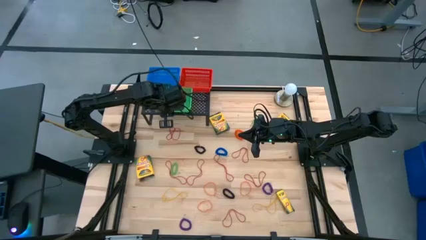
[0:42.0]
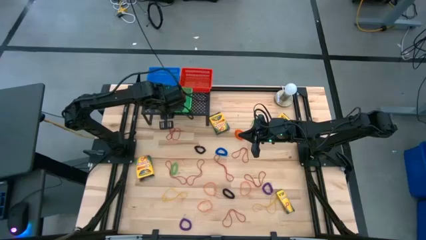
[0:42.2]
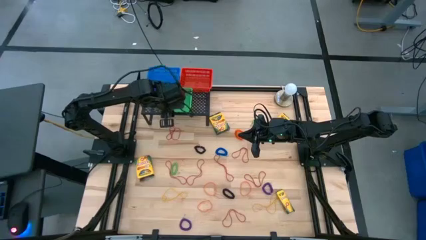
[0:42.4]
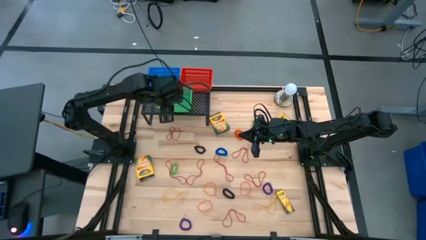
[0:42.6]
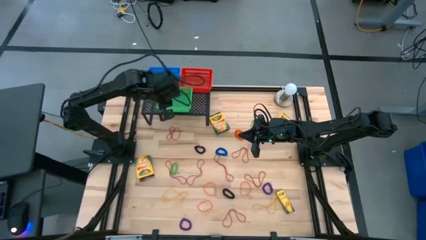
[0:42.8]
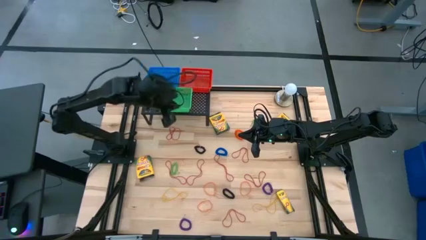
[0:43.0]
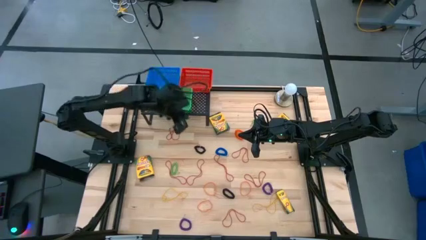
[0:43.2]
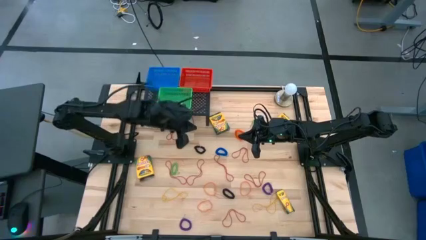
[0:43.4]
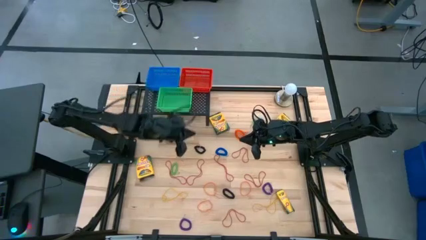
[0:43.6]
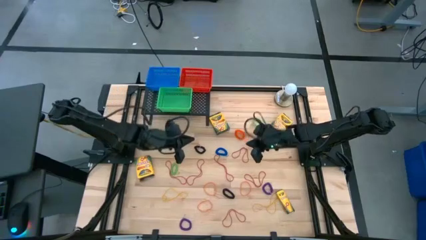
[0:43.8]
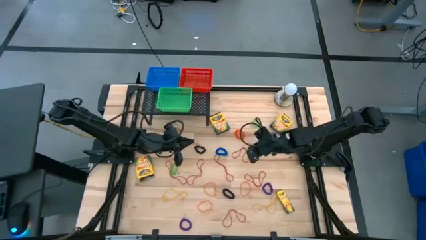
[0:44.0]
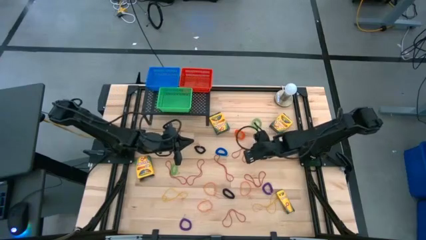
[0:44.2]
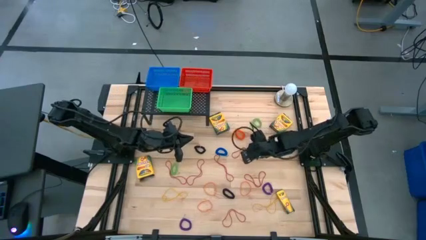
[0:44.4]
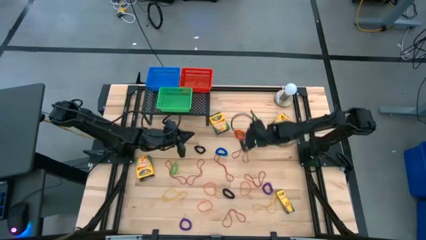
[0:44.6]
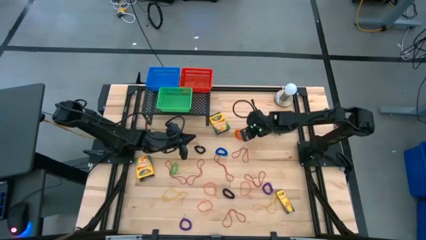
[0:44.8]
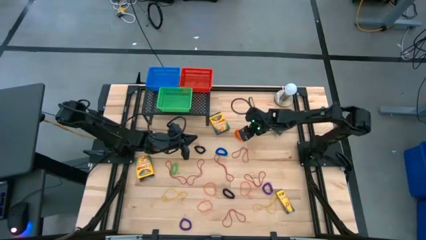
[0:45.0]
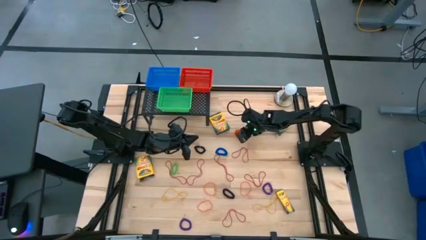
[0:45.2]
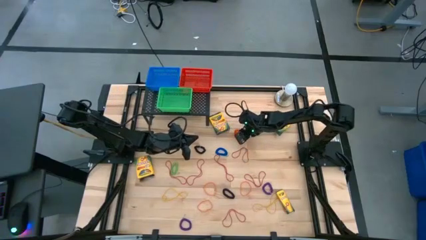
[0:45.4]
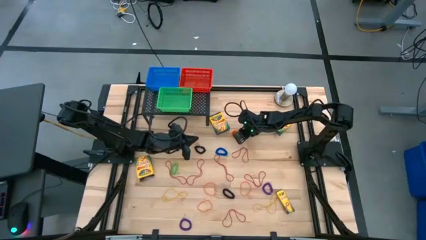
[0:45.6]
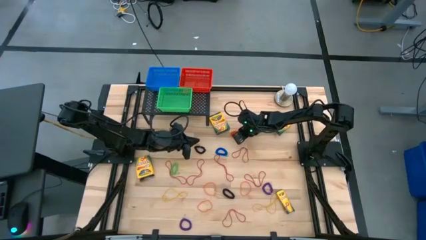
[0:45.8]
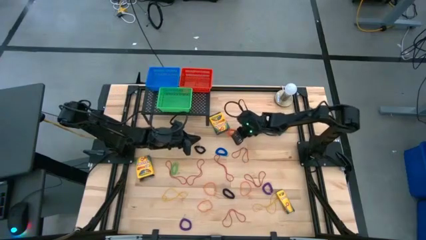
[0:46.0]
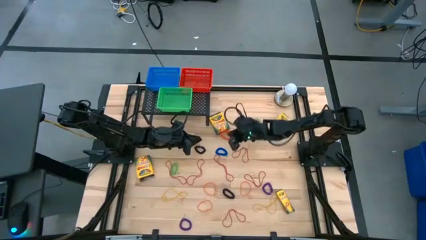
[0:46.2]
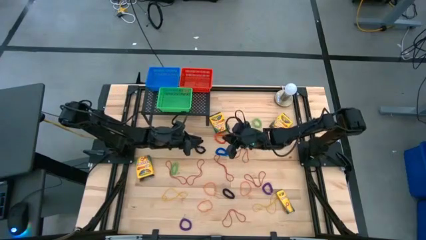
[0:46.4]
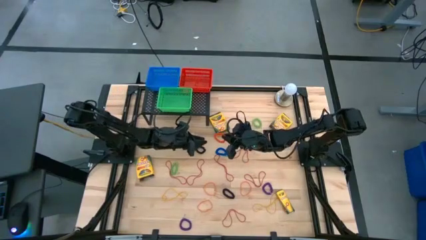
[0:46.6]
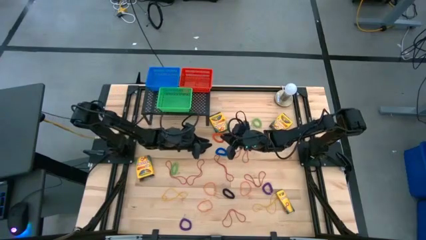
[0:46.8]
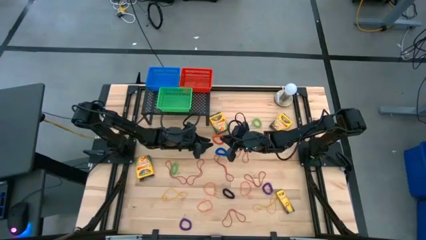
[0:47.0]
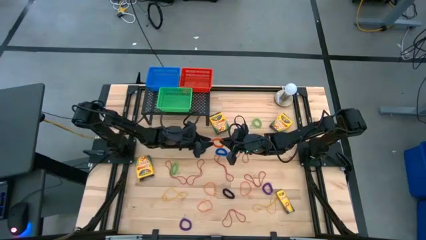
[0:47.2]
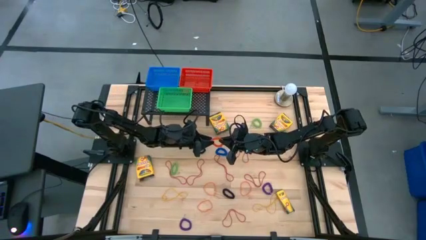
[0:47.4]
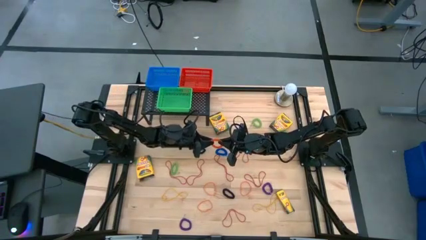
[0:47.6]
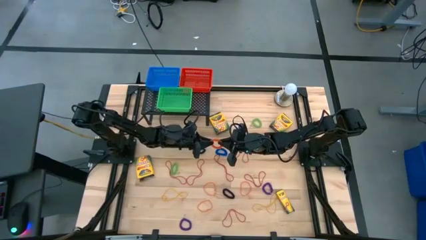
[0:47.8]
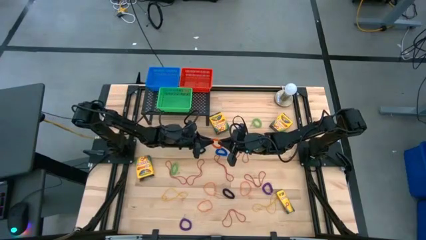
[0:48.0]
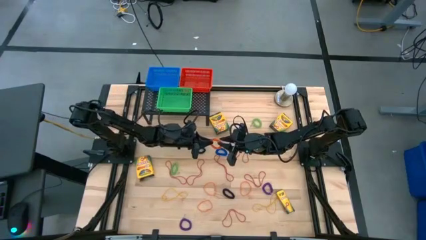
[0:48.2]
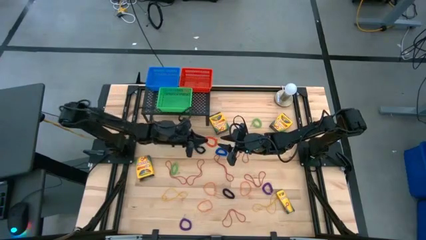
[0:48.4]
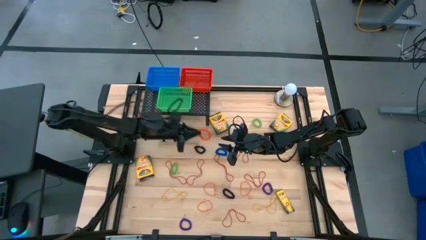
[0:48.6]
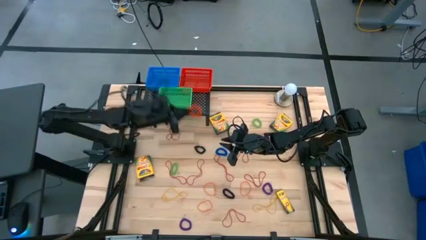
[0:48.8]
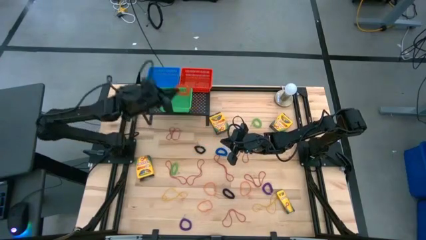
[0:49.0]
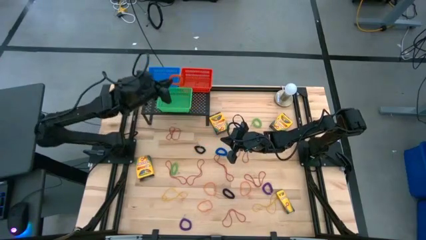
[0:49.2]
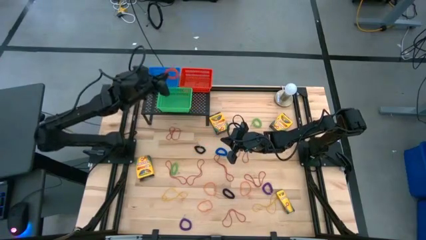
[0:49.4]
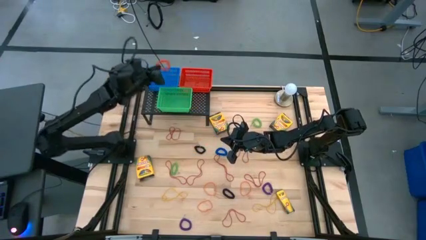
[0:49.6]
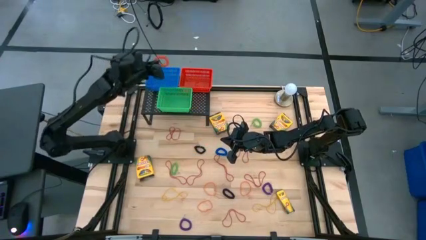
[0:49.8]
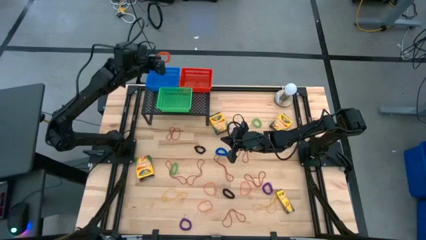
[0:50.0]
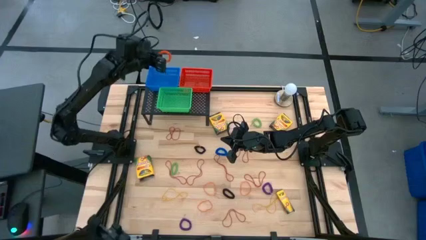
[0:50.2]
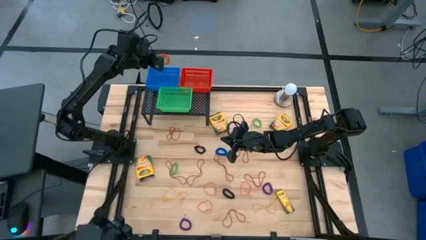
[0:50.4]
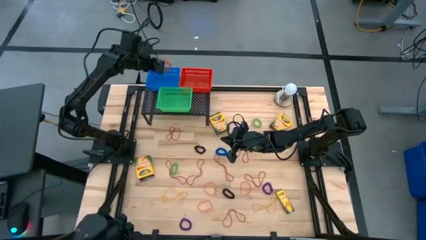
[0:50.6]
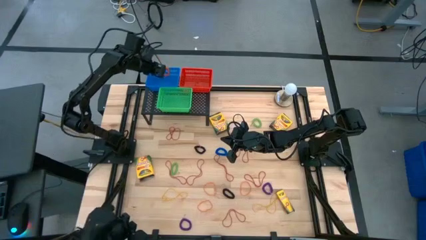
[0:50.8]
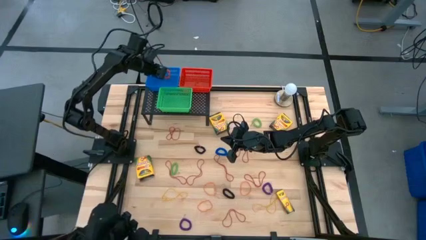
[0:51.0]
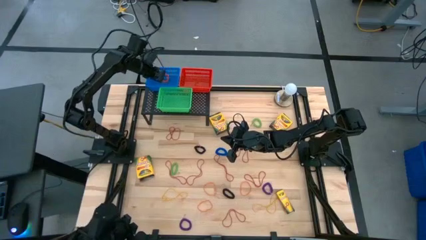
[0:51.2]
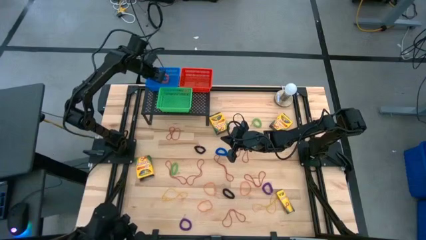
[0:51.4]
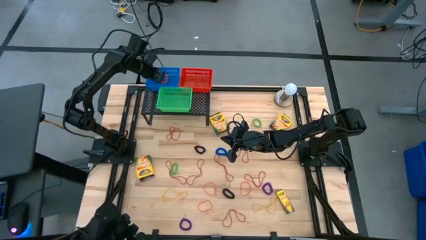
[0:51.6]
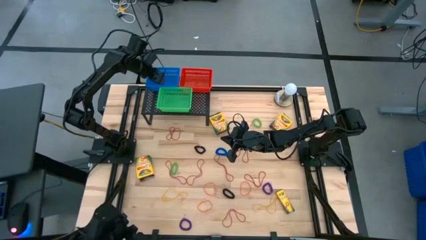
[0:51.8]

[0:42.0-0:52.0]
Task: Pick & Place Office Desk Supplies
Put the orange spring keychain into the blue bin

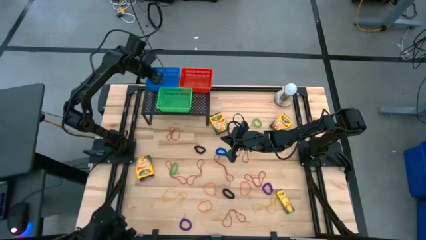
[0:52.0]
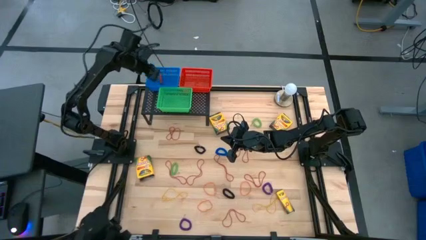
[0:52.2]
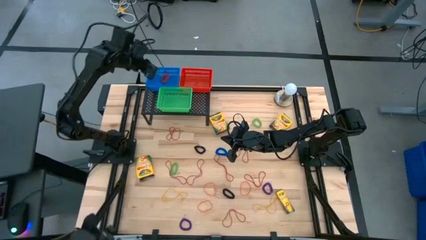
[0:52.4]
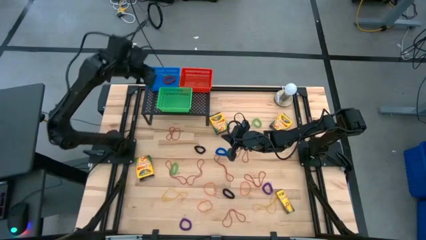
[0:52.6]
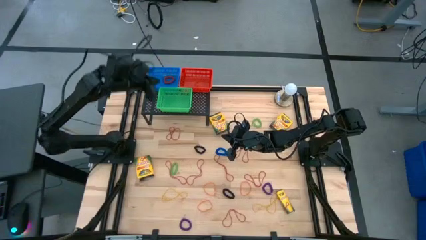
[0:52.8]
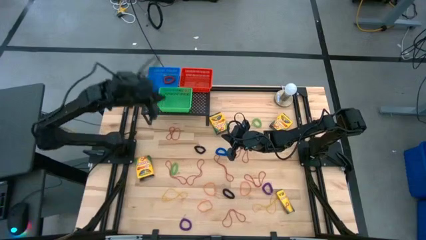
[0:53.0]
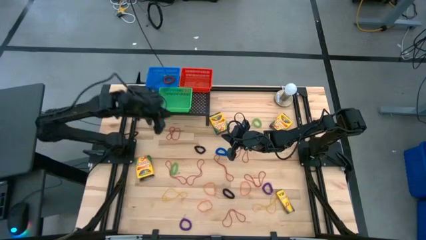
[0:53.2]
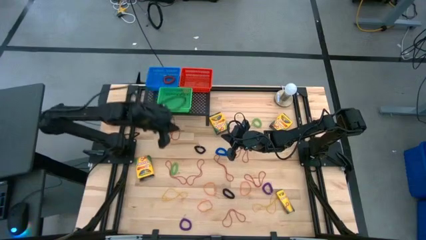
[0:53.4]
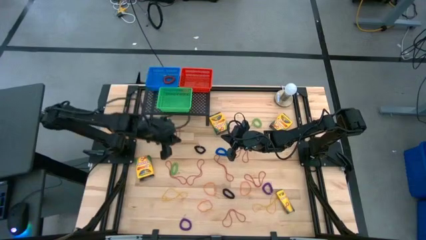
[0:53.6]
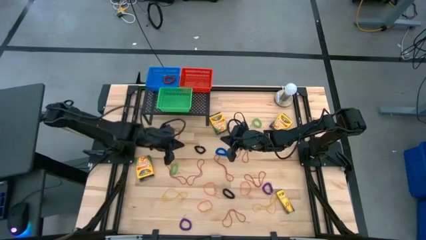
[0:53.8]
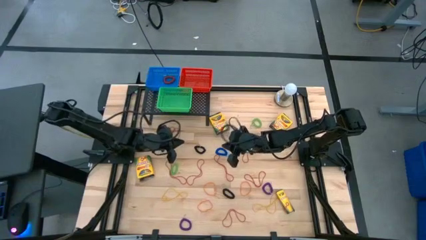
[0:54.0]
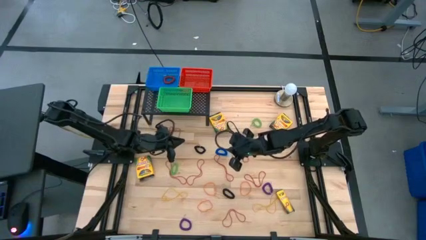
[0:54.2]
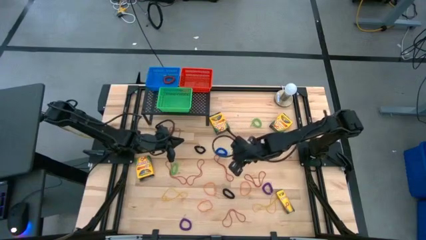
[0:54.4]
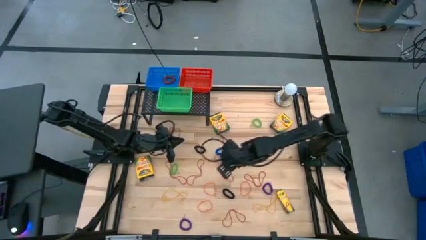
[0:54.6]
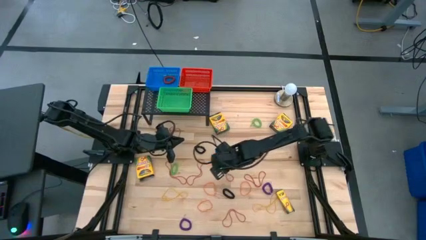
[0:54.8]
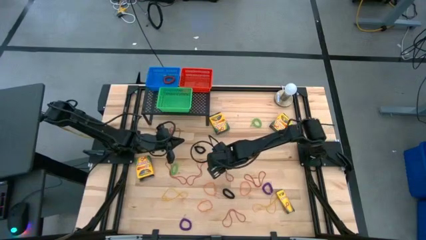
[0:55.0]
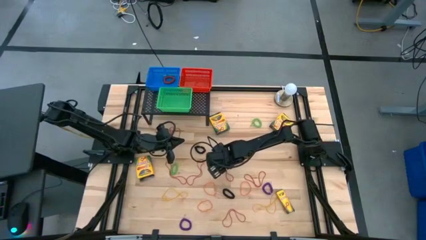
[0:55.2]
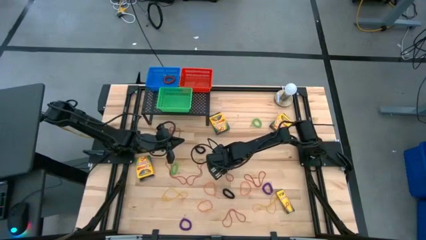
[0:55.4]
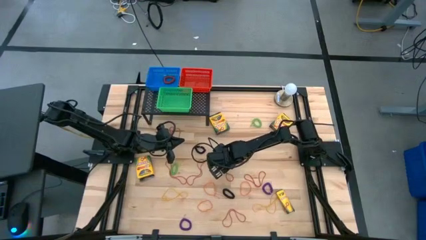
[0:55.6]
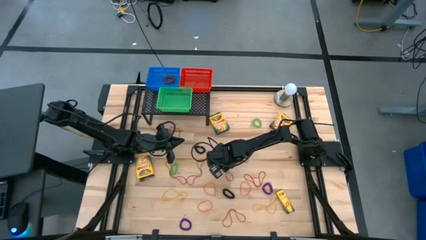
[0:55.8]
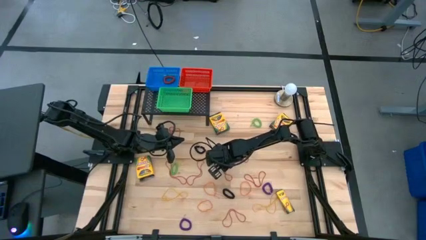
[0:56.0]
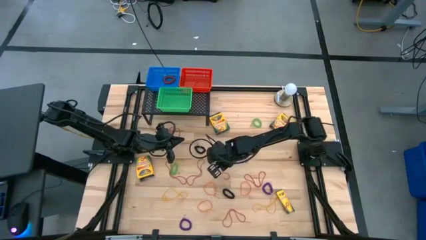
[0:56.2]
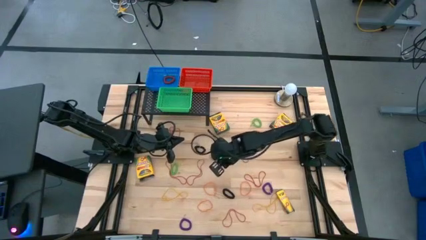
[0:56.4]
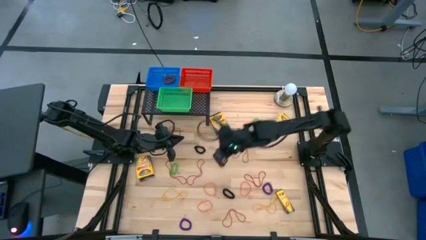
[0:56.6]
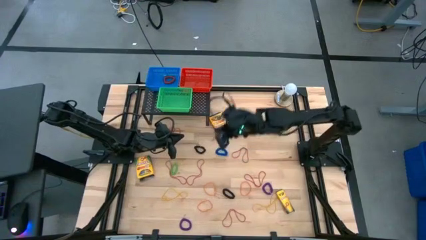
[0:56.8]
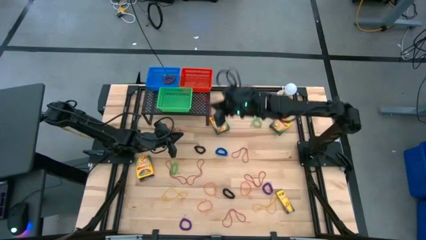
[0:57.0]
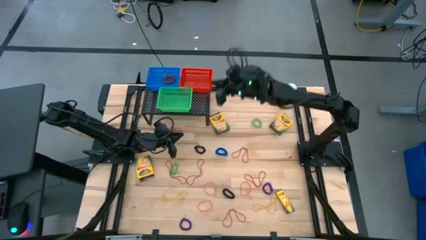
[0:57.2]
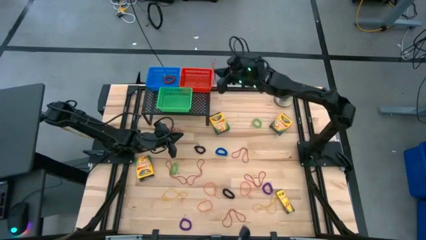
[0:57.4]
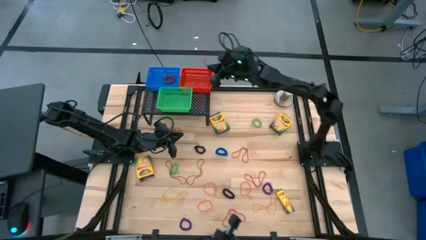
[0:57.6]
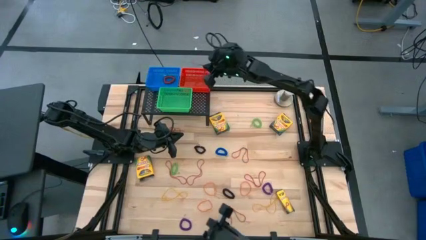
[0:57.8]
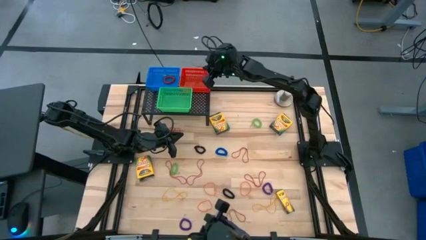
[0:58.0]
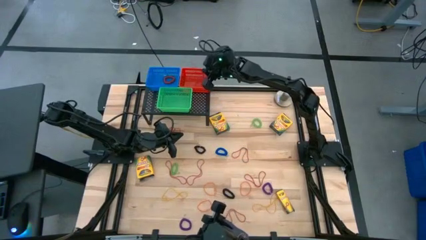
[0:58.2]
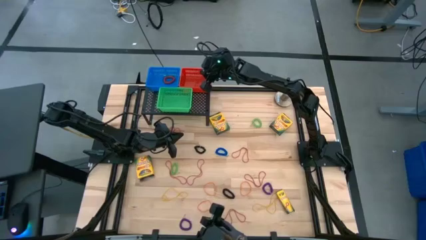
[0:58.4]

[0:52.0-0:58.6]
Put the red rubber band into the red bin
